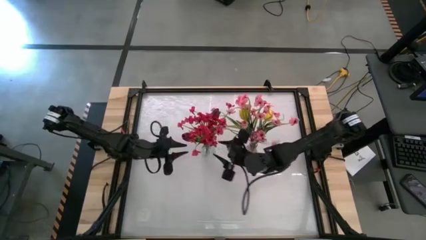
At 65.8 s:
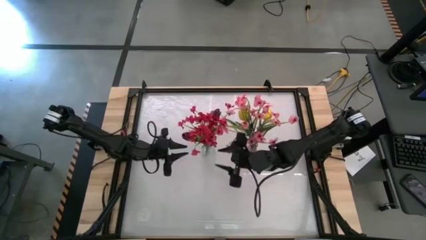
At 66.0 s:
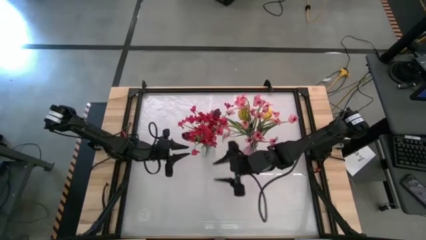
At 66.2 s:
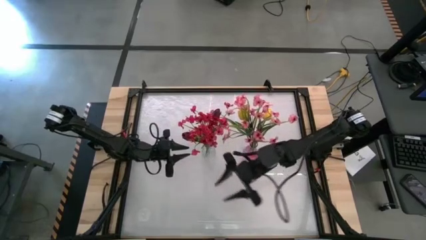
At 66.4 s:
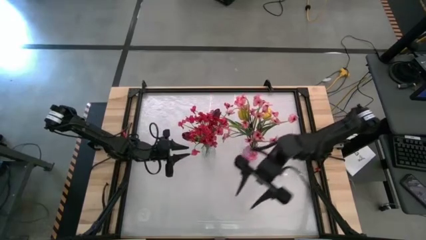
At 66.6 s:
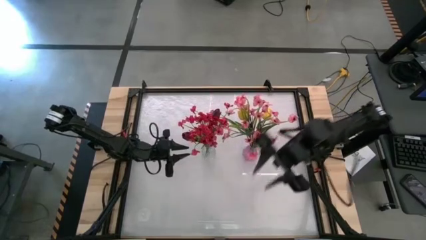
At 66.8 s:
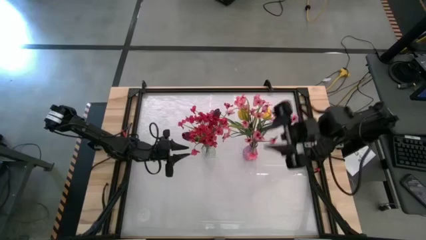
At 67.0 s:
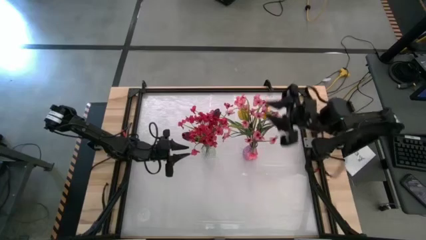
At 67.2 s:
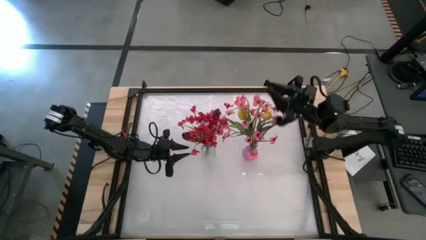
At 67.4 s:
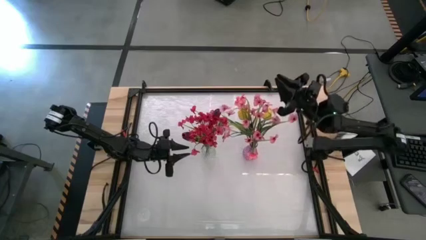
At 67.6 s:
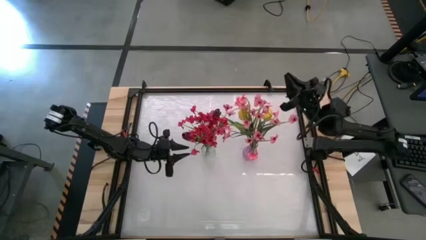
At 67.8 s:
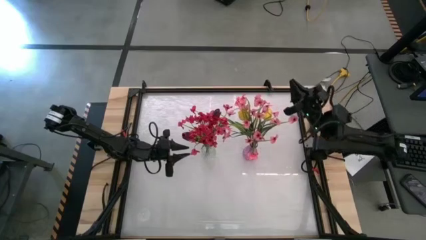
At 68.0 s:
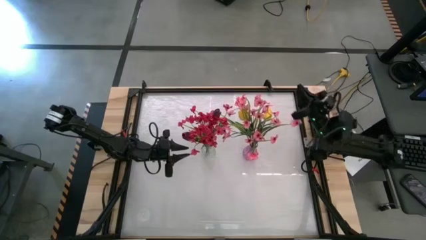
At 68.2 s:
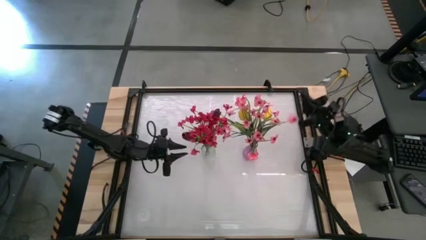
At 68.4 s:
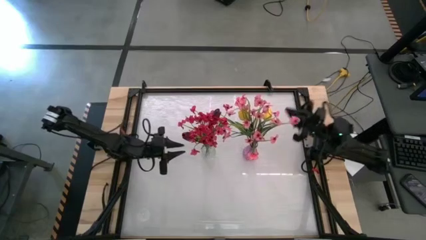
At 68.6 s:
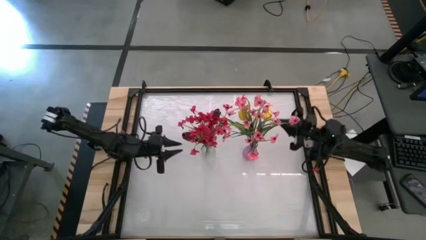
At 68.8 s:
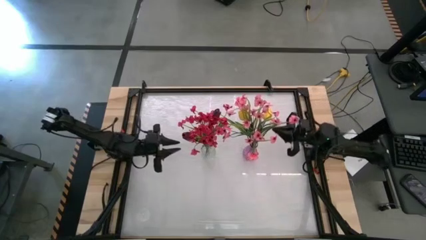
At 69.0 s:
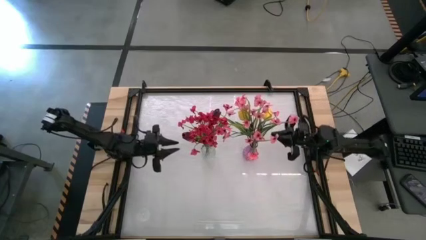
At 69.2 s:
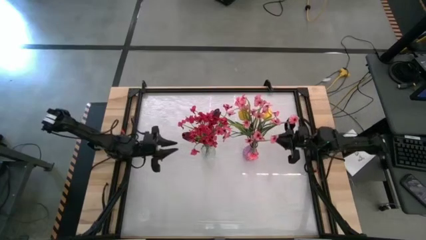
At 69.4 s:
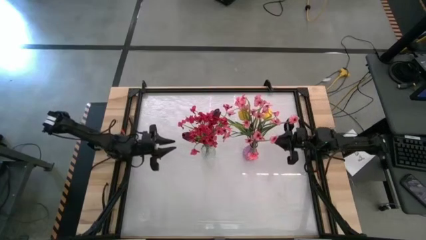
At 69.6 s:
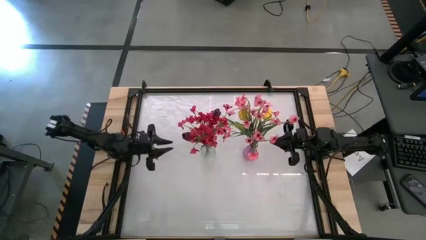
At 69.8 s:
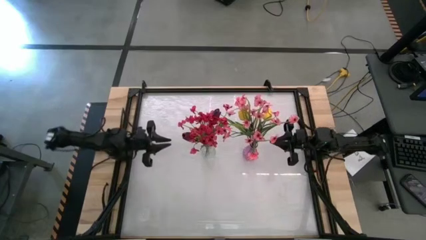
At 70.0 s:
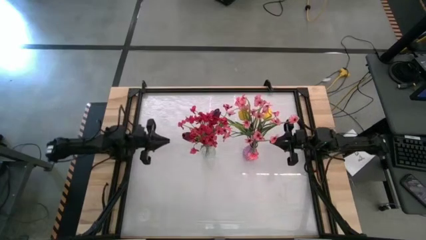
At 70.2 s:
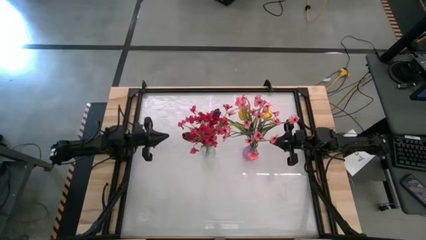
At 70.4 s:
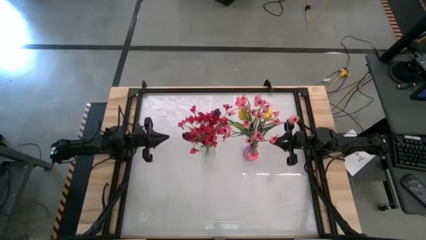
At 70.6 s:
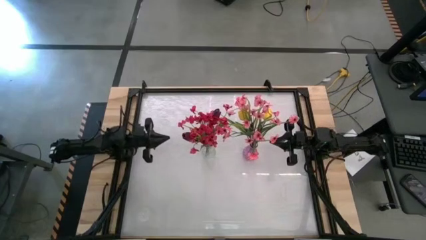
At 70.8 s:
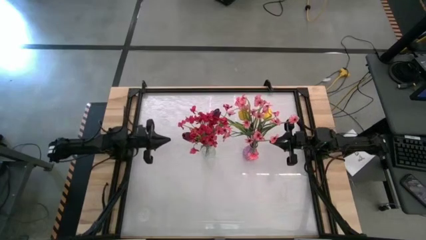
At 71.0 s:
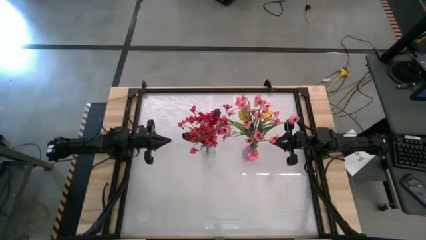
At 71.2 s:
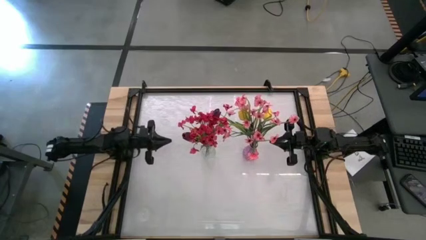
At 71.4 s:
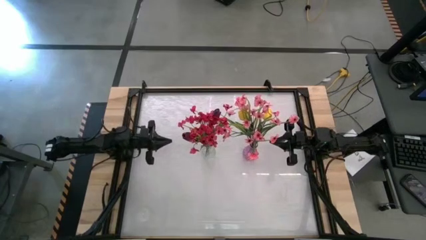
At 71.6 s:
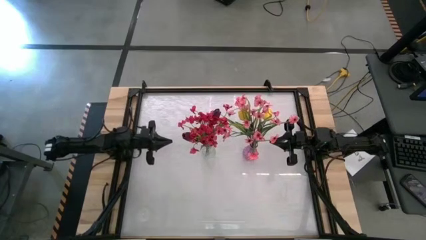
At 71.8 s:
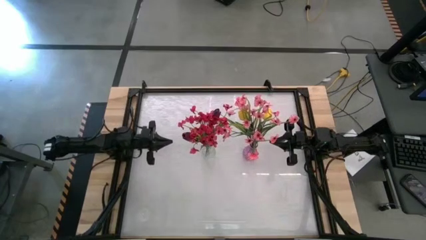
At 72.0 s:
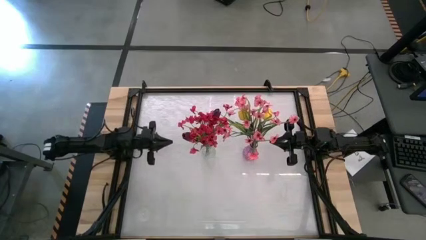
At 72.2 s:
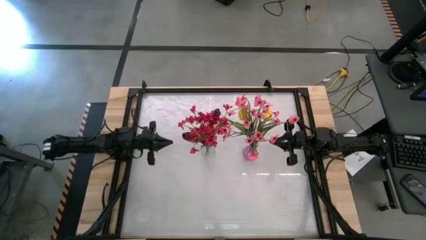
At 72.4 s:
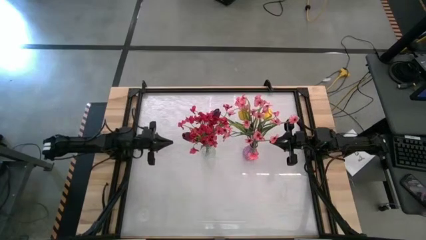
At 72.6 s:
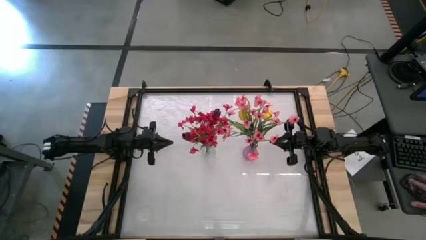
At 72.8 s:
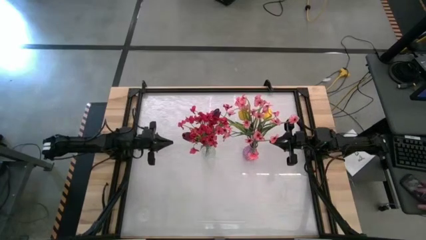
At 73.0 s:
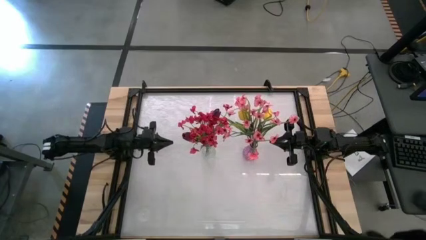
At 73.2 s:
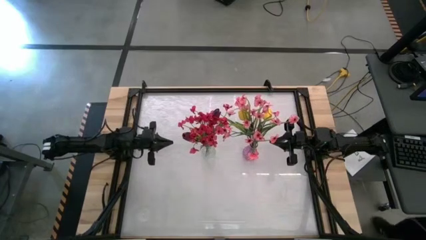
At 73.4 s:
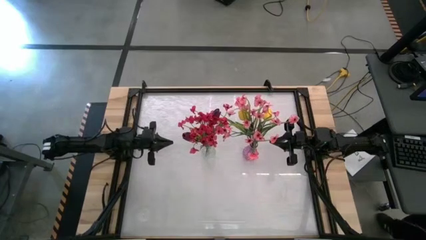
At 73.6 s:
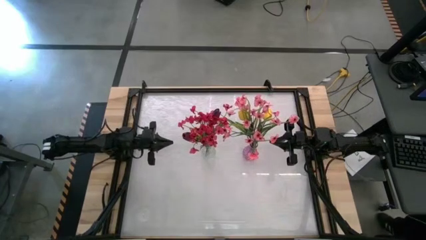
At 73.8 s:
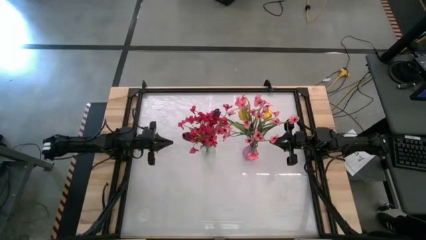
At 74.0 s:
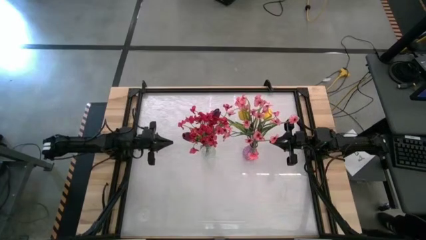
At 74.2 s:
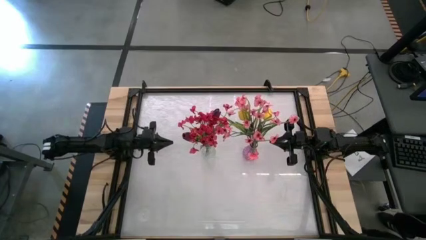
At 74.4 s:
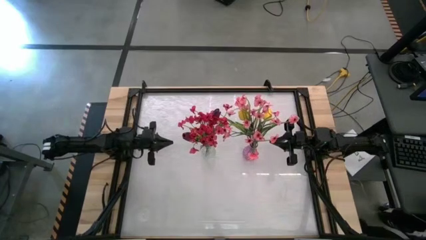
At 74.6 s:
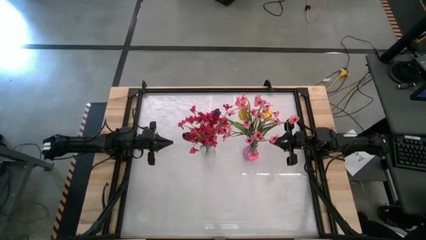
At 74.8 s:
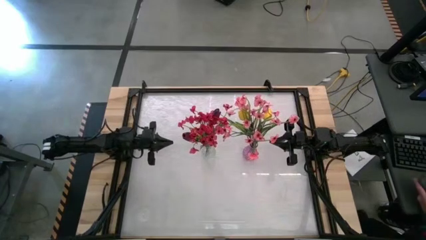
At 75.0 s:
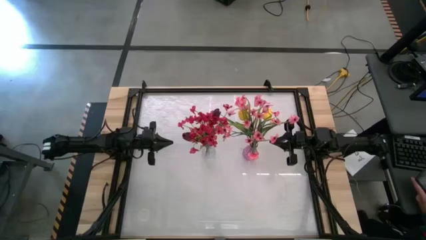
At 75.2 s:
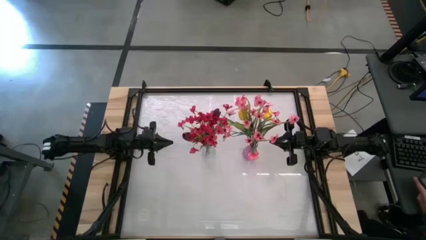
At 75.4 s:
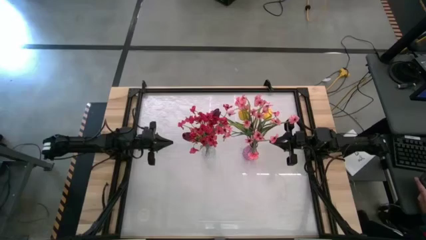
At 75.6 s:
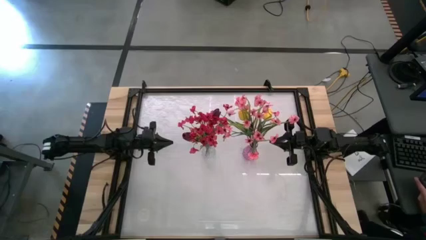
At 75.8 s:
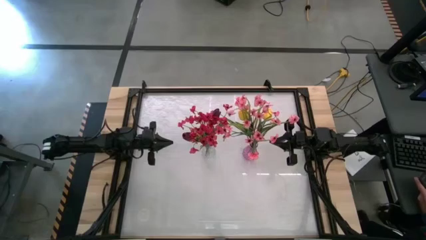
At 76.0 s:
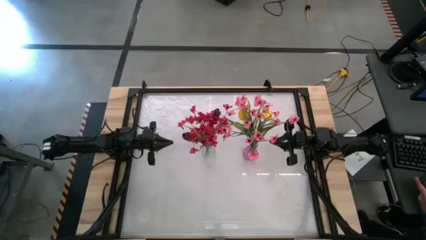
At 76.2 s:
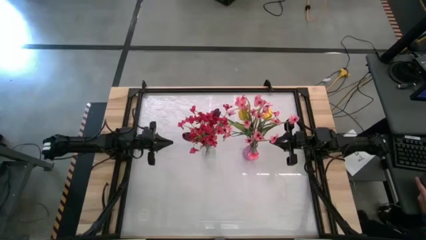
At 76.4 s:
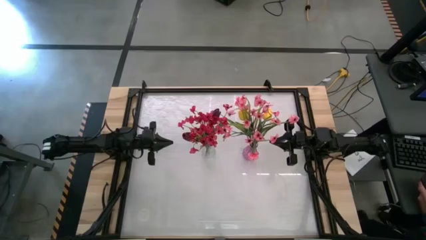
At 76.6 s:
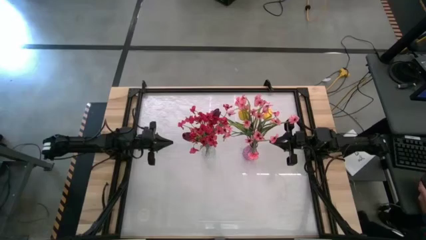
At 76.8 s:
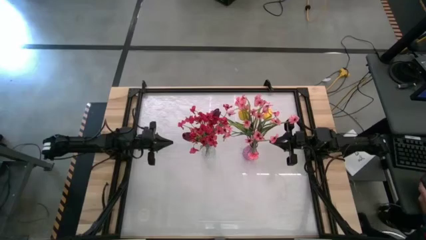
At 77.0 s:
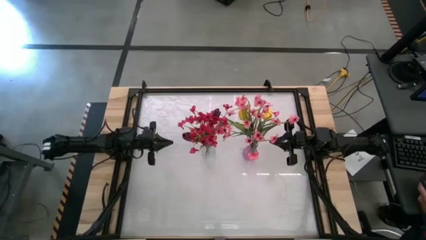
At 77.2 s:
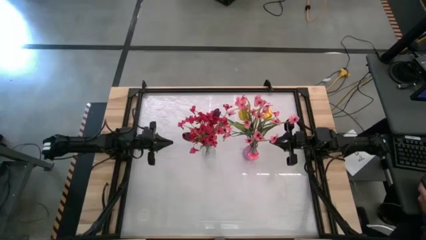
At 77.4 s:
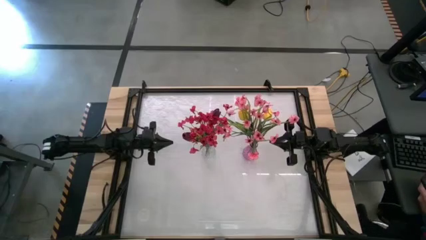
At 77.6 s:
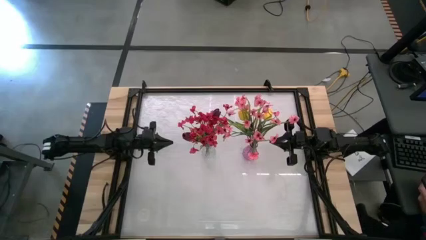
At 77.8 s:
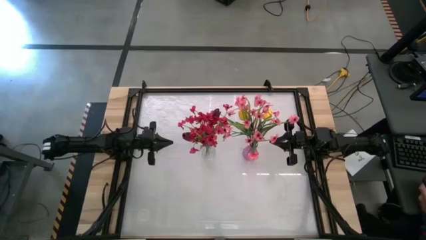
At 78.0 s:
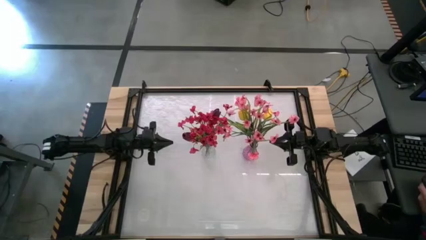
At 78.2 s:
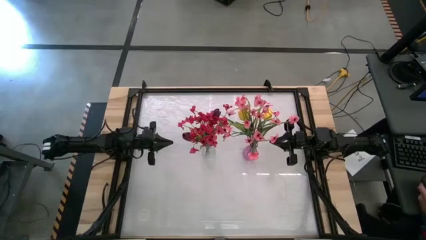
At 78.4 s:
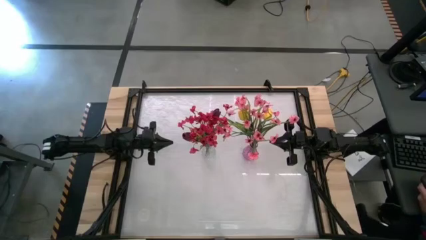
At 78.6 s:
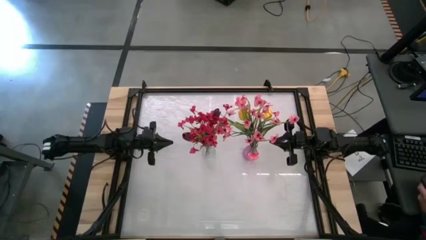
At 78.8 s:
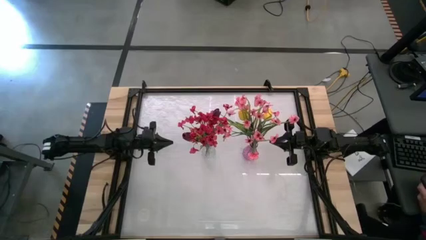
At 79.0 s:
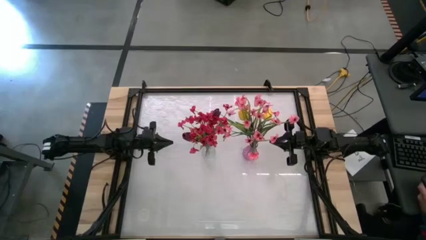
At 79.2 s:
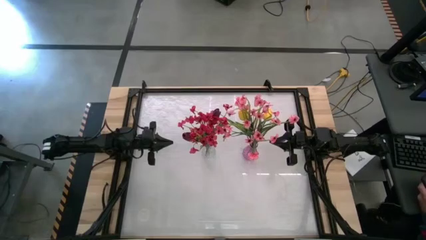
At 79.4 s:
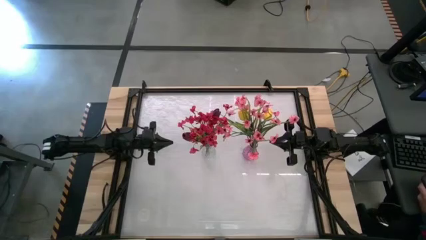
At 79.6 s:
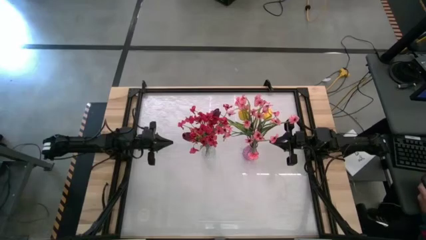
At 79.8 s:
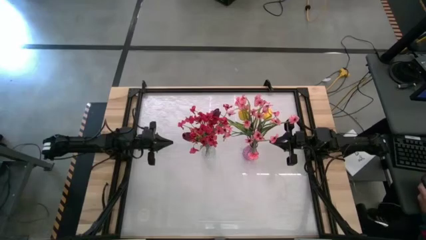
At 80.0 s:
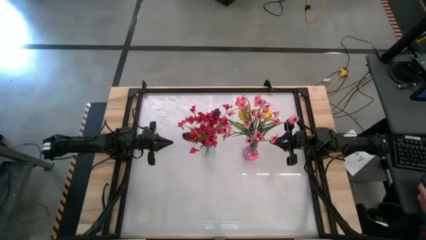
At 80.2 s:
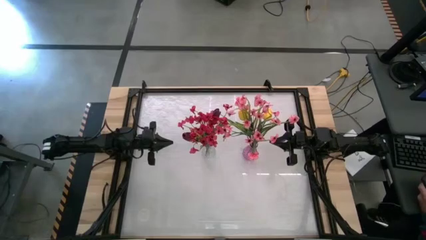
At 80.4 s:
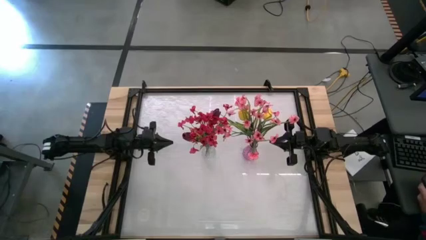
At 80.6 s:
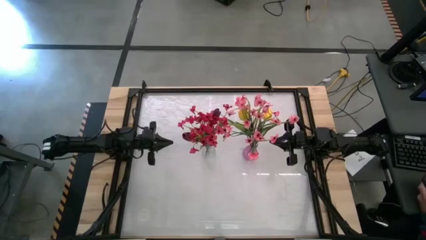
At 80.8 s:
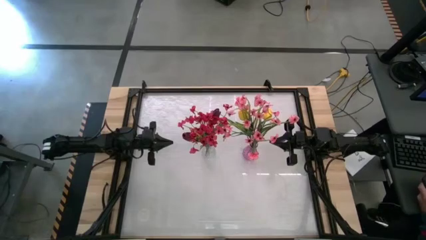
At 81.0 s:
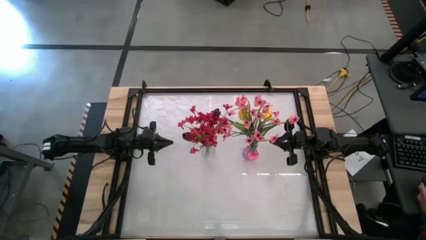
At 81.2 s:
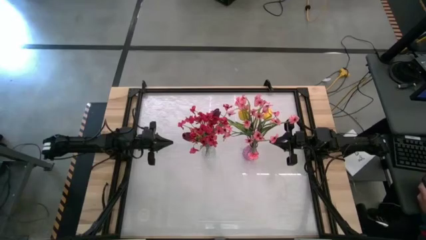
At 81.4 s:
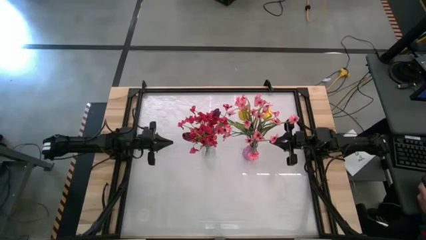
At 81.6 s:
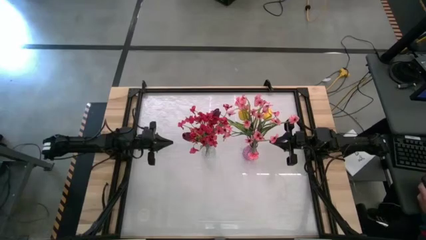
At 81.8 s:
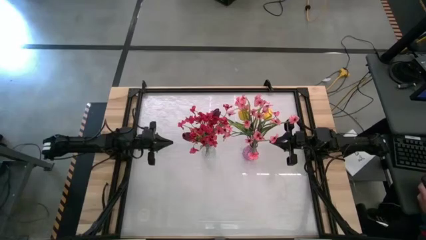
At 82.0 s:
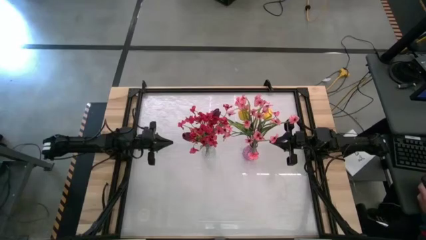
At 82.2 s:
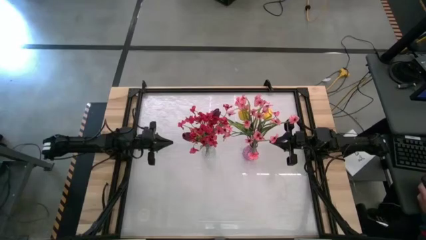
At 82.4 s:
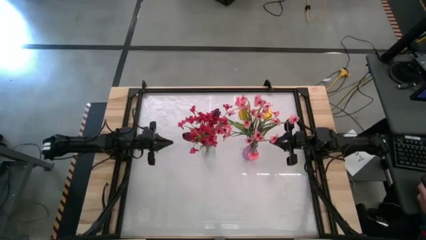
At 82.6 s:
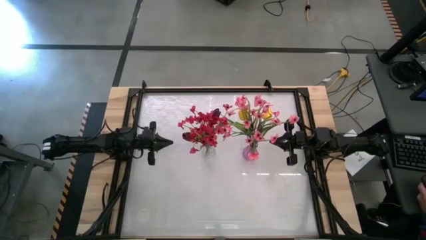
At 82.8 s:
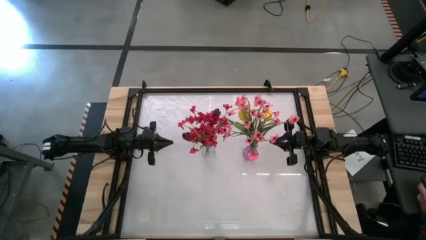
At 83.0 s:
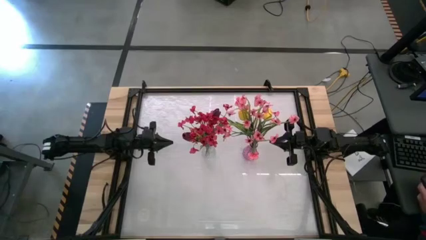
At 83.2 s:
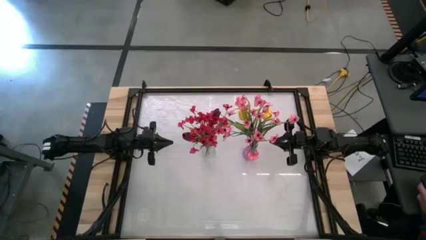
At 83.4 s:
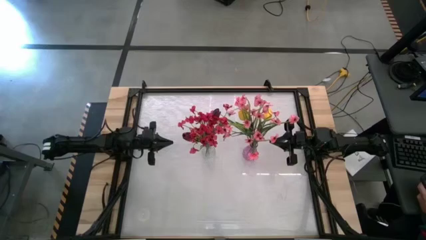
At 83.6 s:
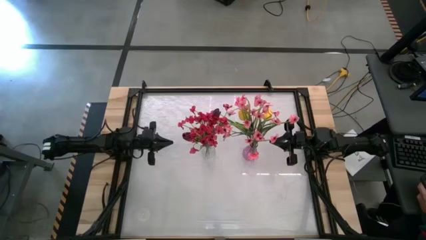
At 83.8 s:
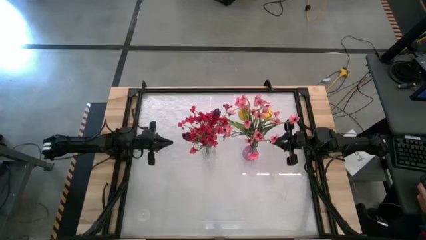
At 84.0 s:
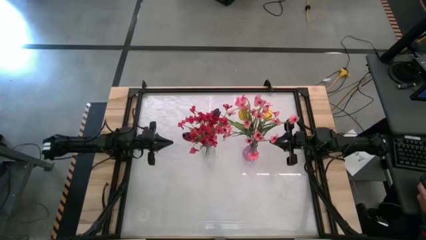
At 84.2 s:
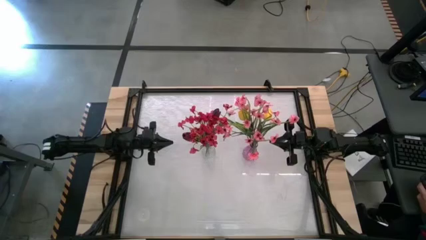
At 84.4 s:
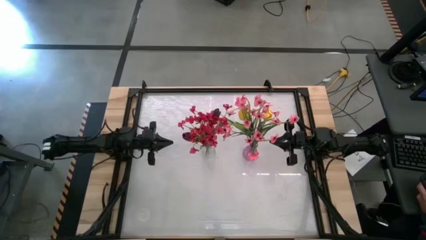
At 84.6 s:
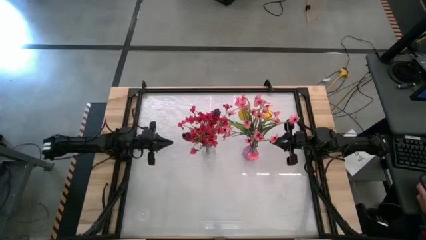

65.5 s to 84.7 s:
Task: Sort flowers into vase by color
Return to Home Position
